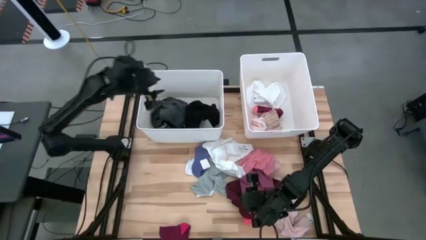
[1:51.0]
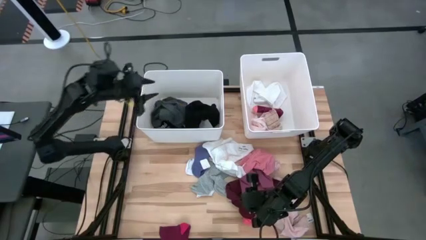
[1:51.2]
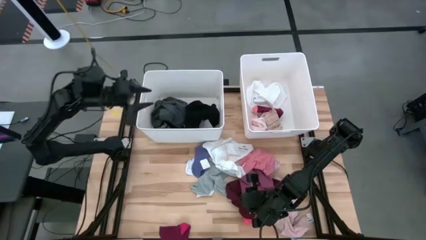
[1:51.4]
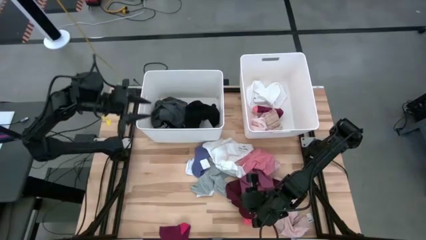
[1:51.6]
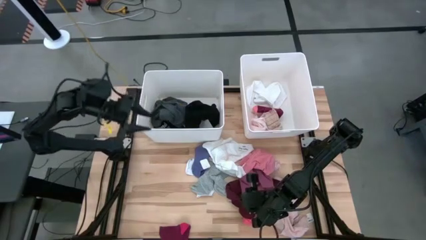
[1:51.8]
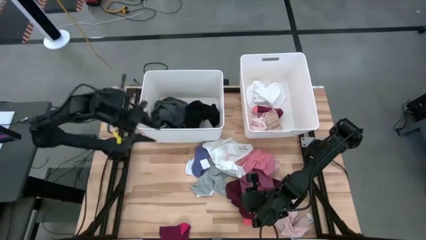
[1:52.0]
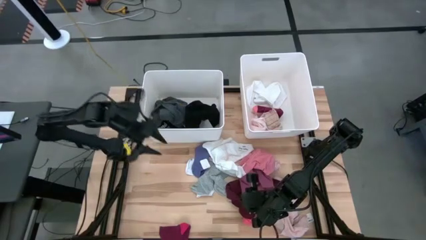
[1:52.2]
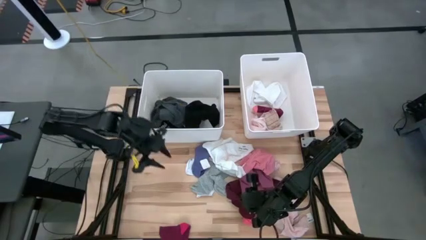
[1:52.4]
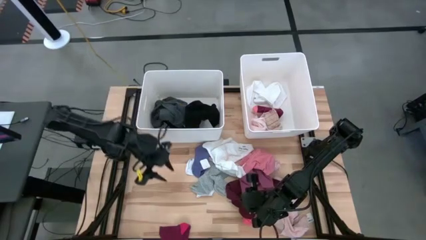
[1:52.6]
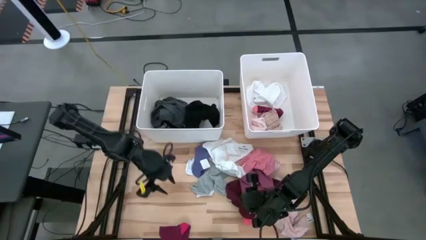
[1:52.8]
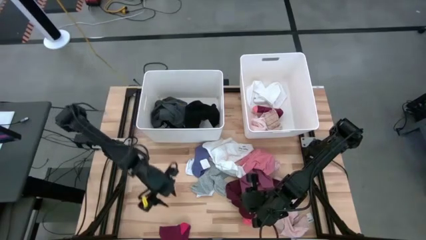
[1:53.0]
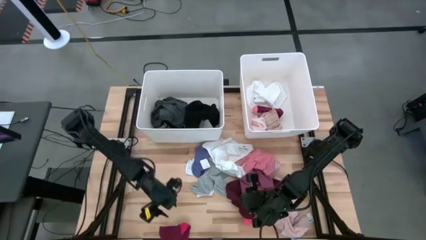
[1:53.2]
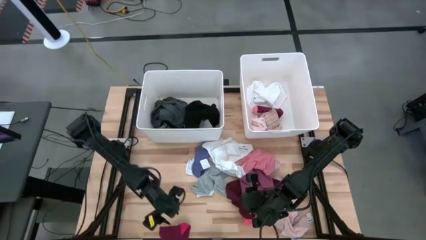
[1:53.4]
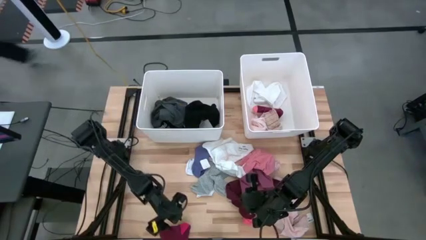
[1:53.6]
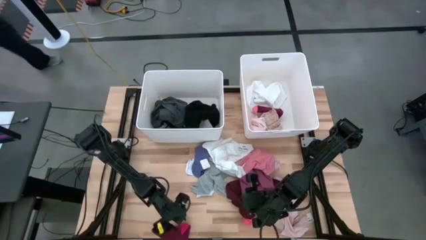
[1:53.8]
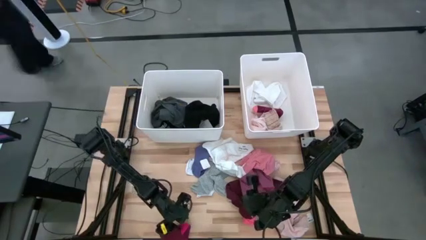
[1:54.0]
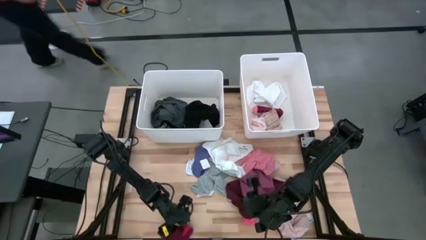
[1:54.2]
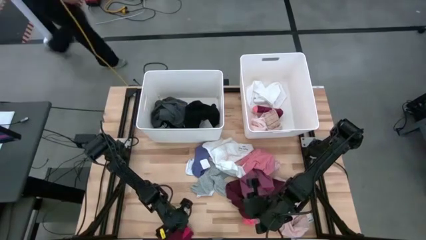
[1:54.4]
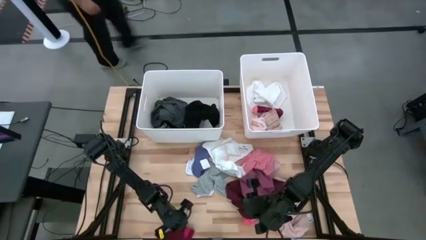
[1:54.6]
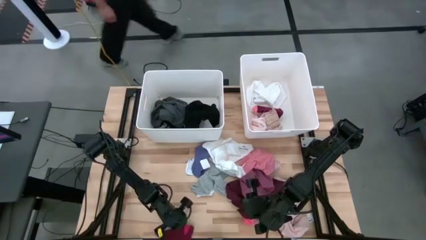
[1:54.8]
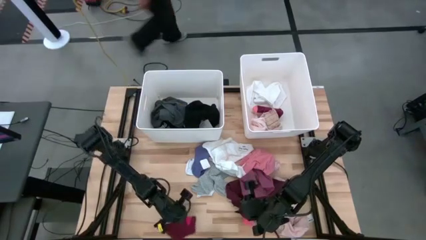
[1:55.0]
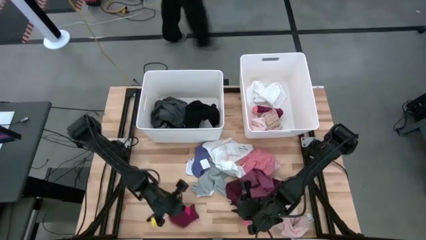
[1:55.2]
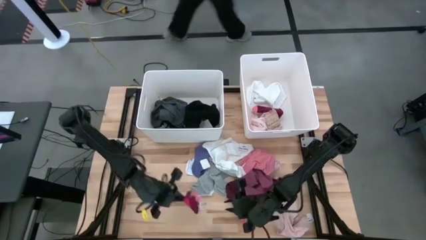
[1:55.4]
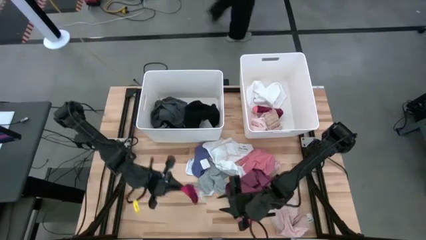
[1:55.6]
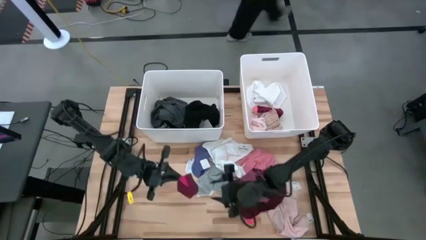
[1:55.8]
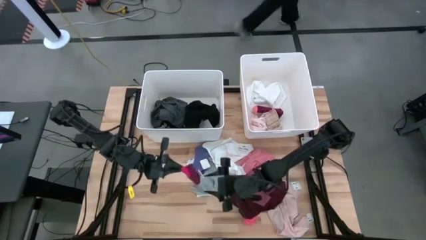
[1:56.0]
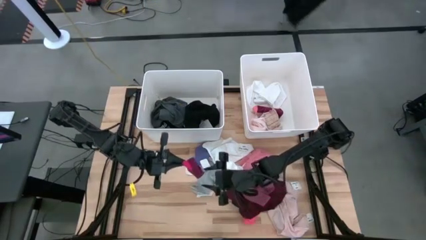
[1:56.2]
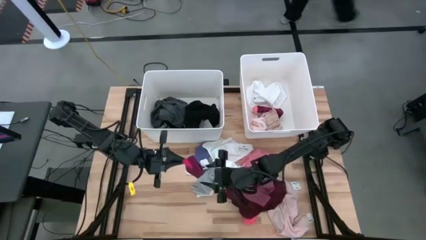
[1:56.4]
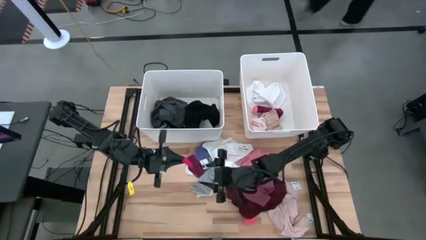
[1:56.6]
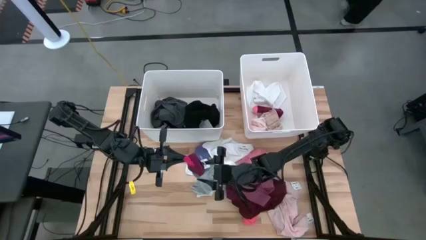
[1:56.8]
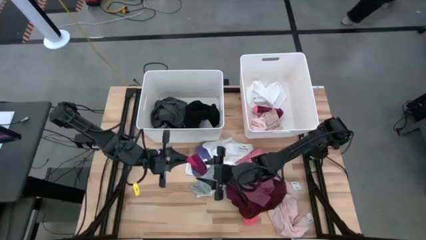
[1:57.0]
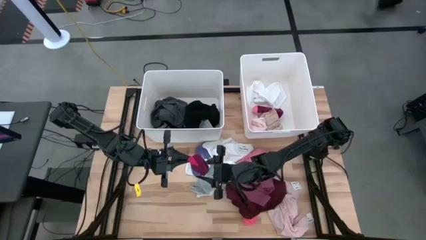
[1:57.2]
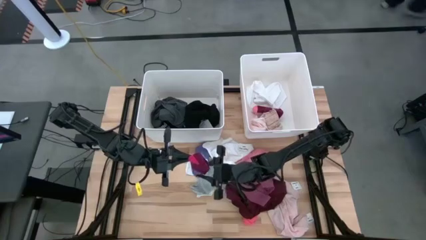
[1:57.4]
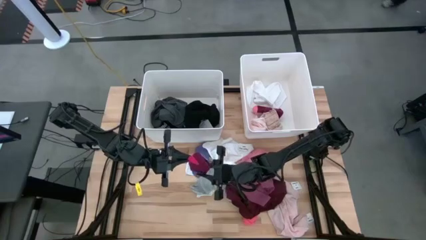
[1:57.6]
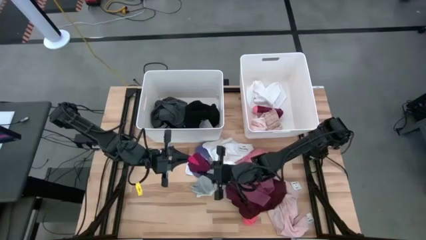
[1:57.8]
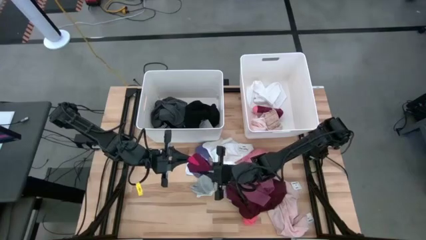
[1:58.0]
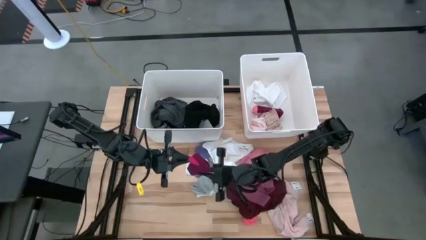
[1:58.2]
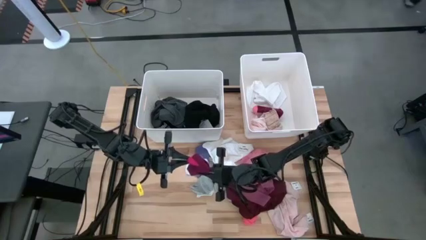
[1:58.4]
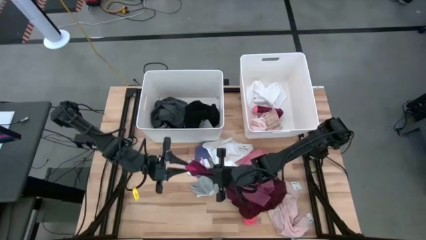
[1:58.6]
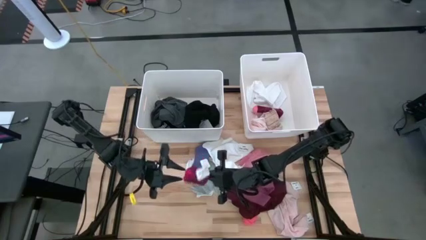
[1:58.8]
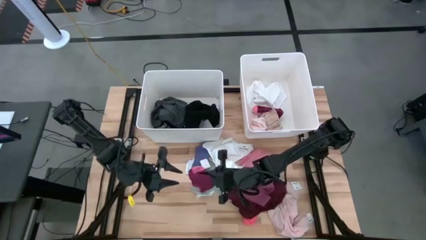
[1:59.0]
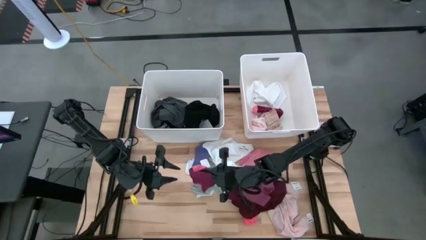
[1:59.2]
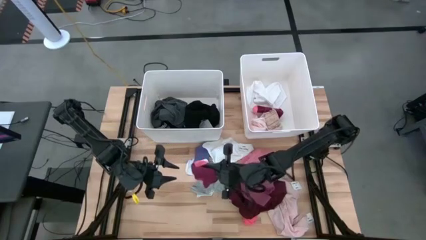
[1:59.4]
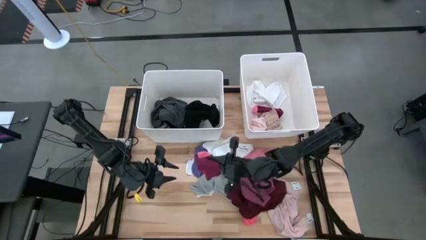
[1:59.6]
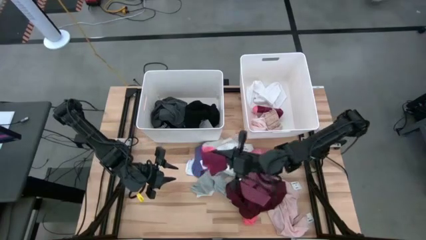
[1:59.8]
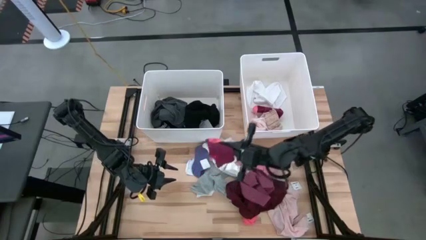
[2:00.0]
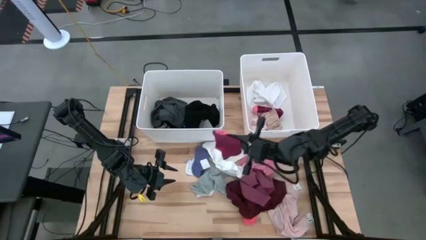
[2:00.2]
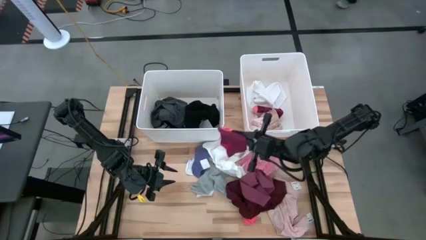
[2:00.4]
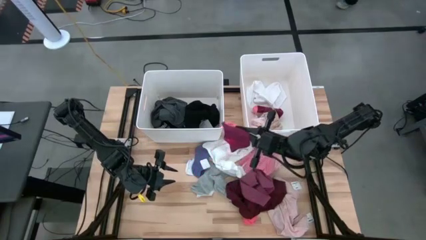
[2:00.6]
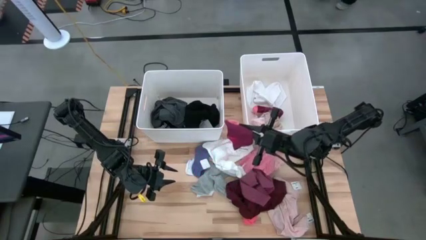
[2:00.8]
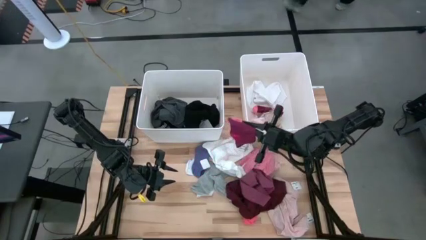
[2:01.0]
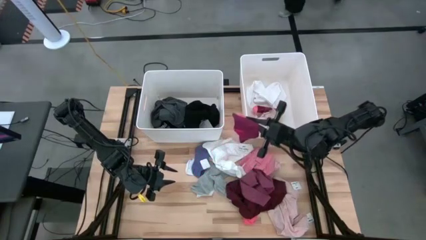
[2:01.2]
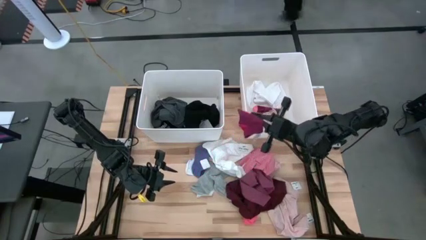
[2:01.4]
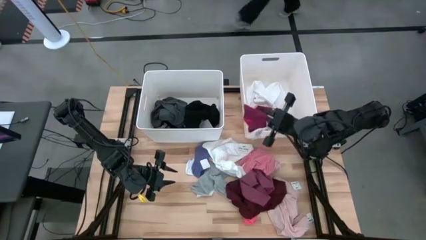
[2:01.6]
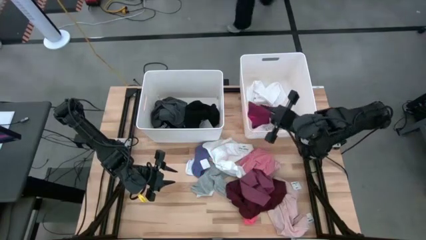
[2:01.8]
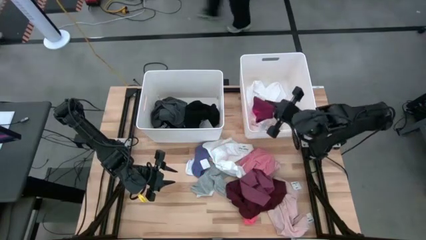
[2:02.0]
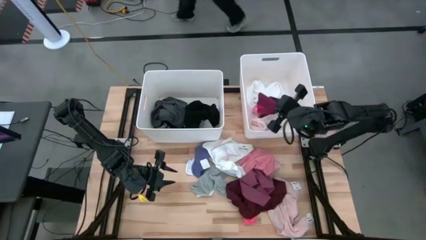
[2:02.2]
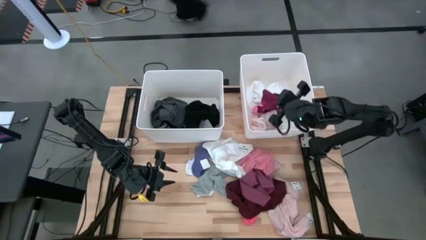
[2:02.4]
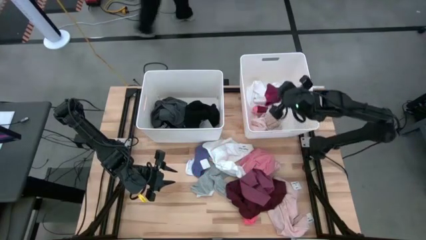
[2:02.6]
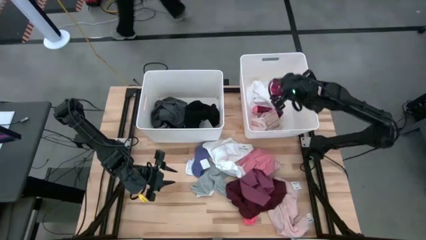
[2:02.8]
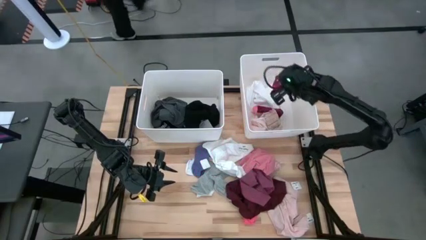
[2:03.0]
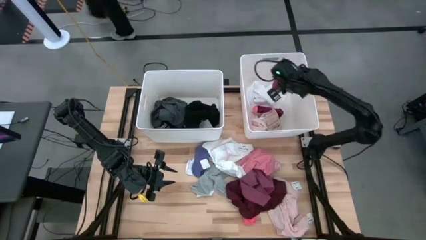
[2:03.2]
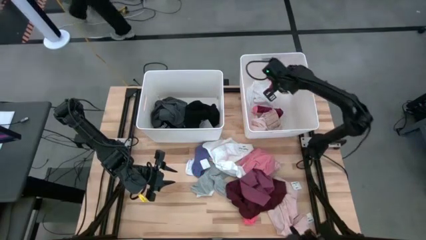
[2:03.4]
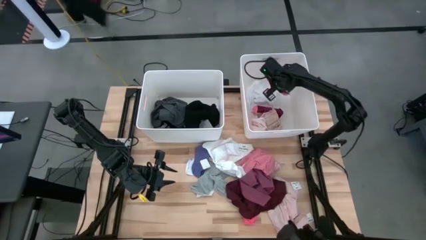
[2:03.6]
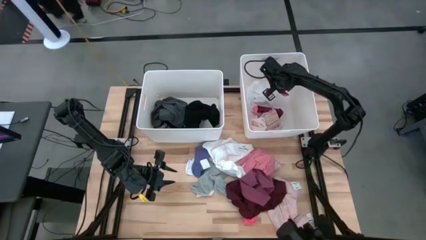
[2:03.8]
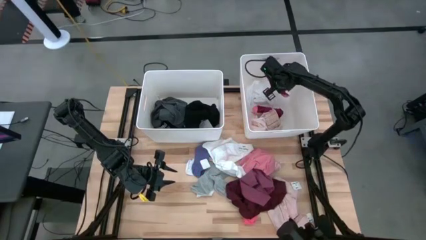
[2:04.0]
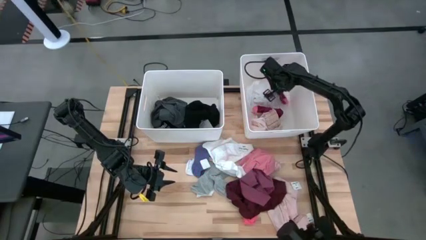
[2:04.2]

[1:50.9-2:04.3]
Task: Sort clothes
Put the red sock into the right white laundry organizer
